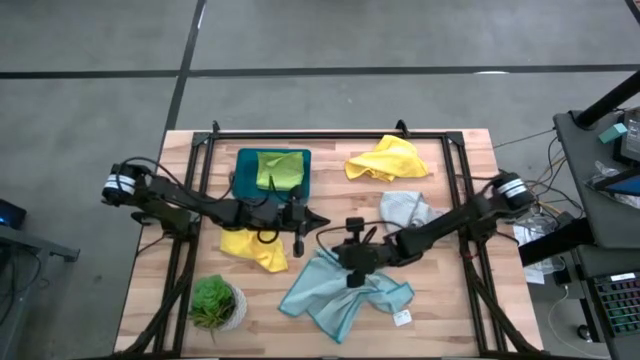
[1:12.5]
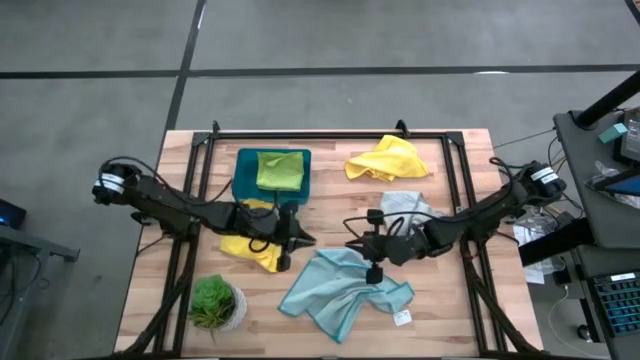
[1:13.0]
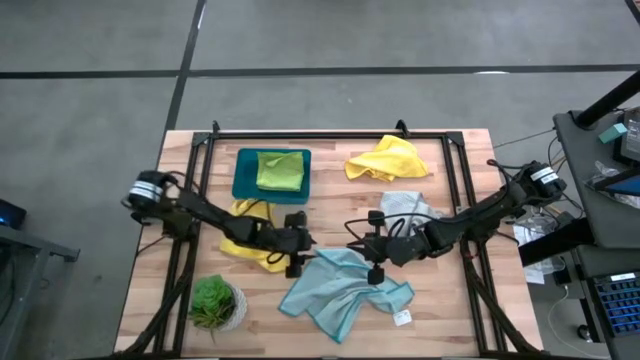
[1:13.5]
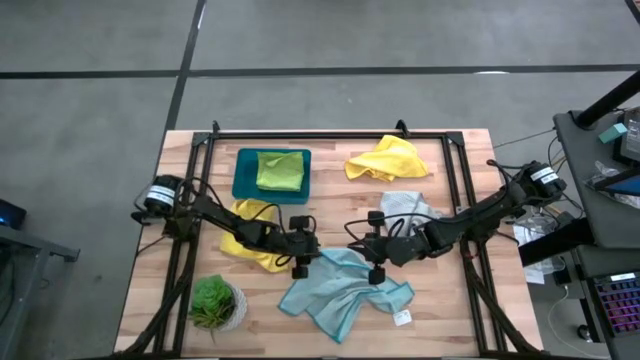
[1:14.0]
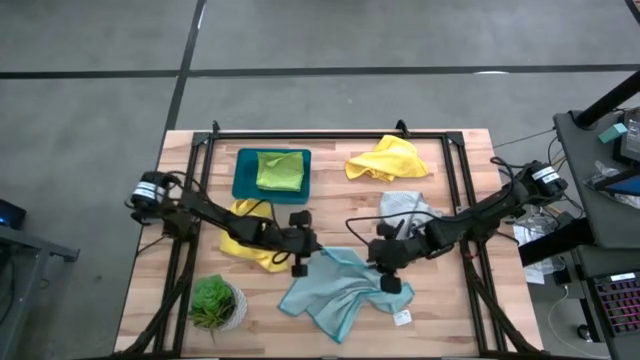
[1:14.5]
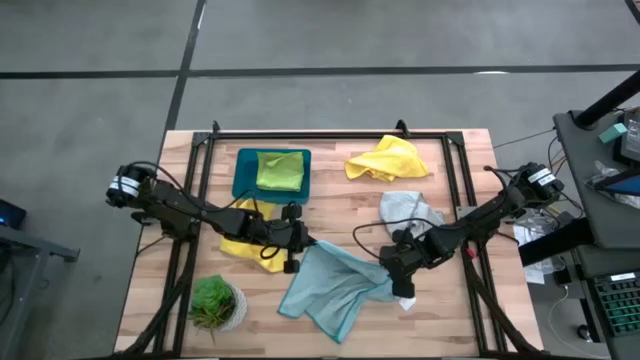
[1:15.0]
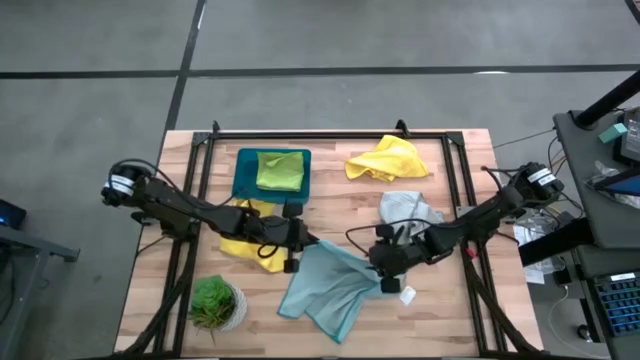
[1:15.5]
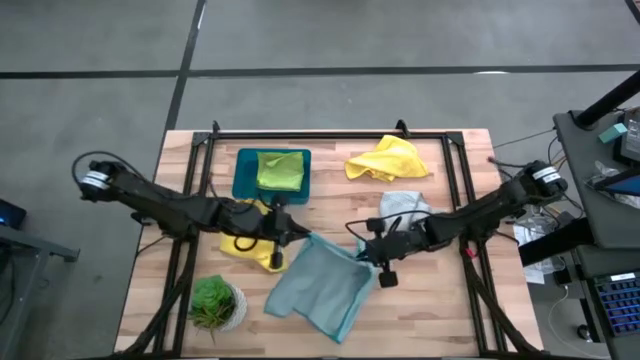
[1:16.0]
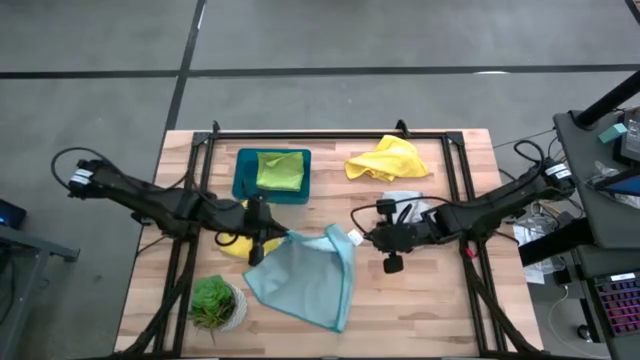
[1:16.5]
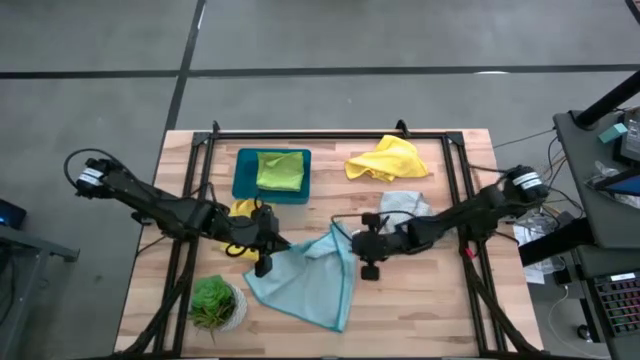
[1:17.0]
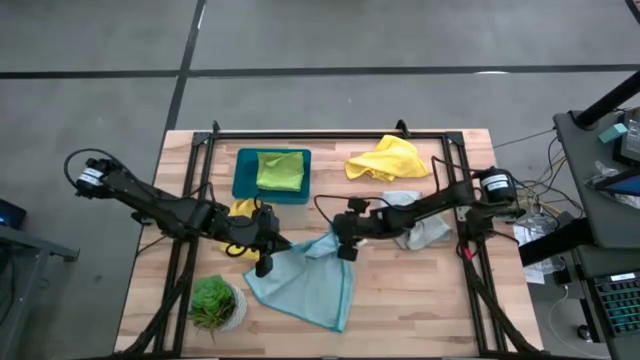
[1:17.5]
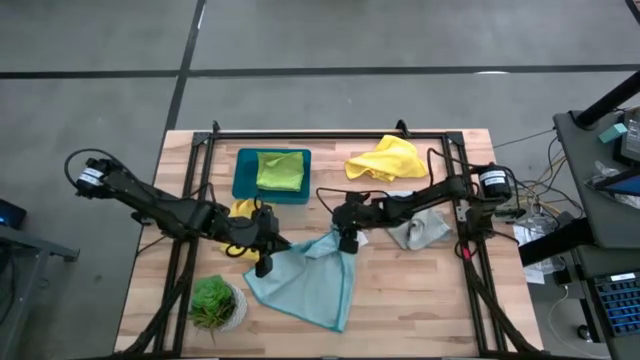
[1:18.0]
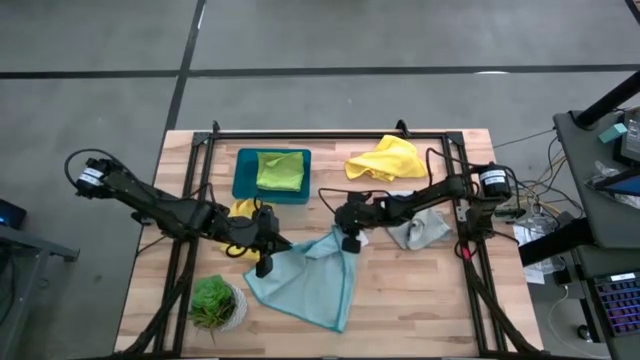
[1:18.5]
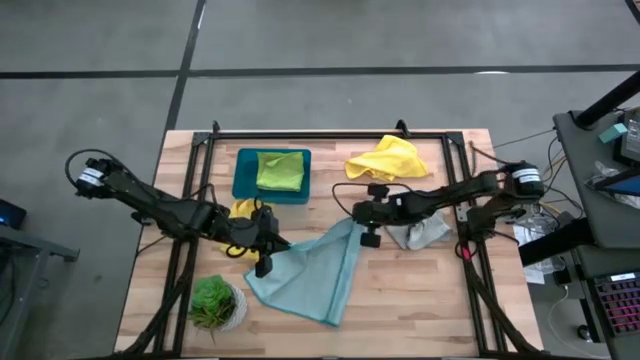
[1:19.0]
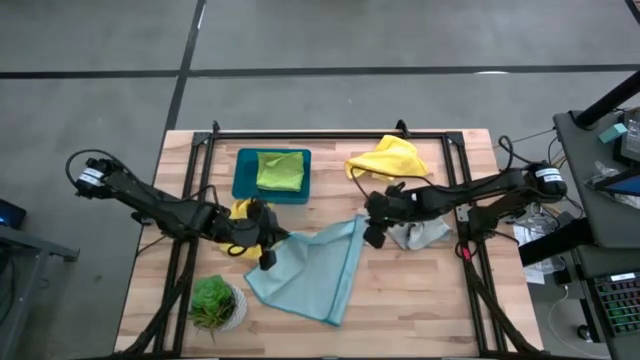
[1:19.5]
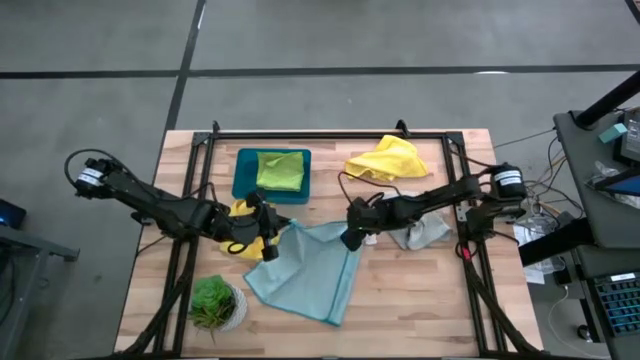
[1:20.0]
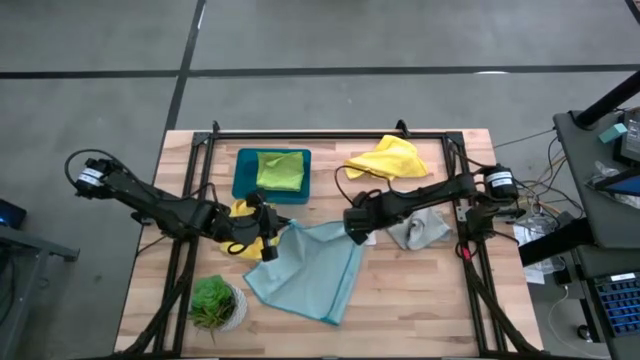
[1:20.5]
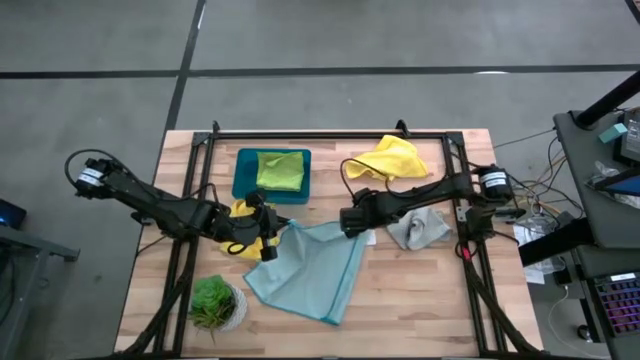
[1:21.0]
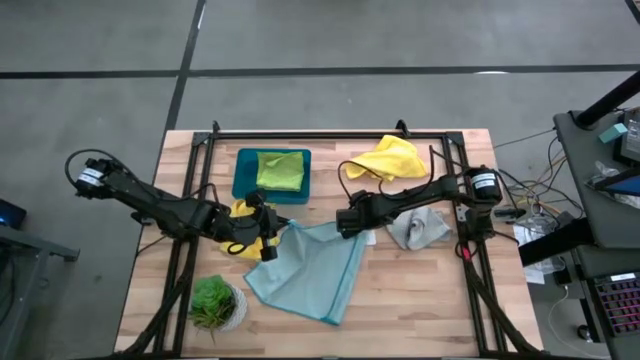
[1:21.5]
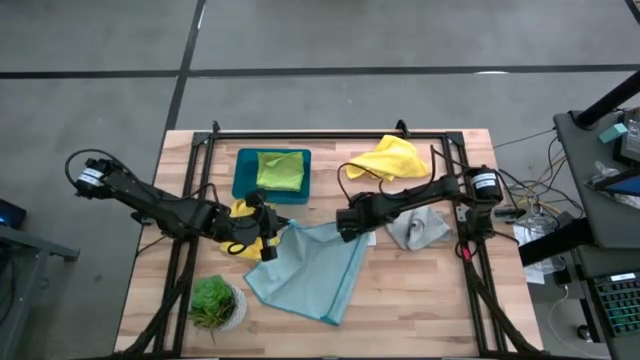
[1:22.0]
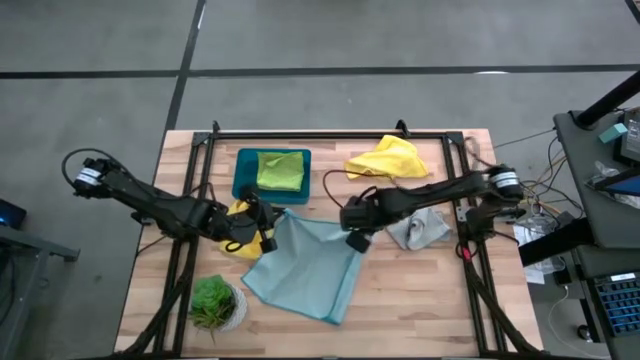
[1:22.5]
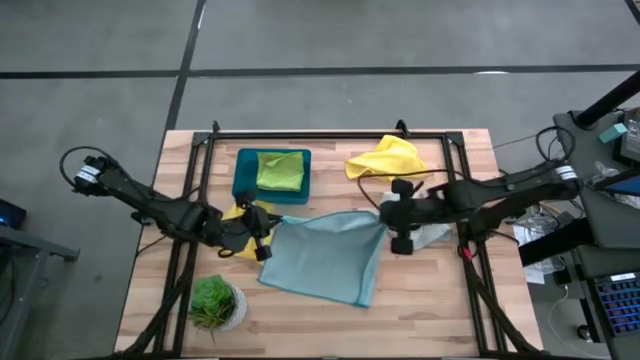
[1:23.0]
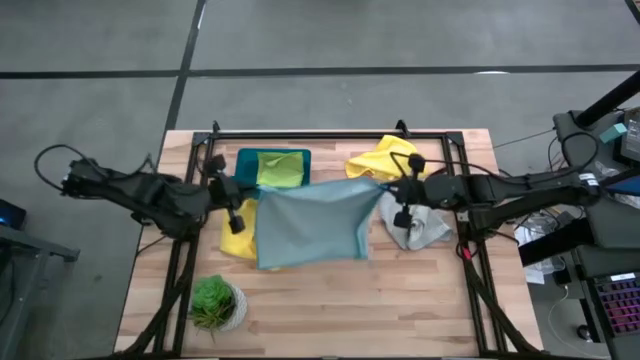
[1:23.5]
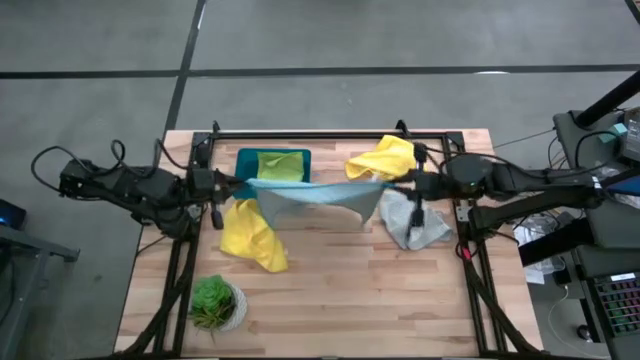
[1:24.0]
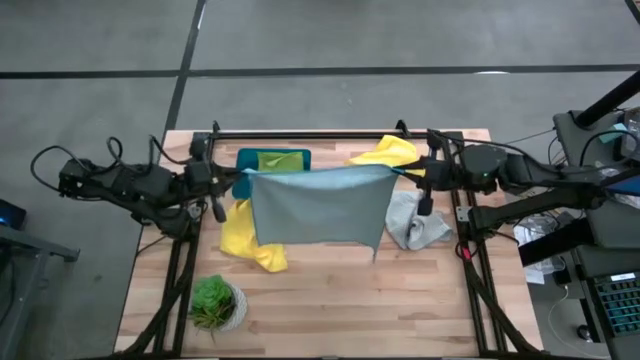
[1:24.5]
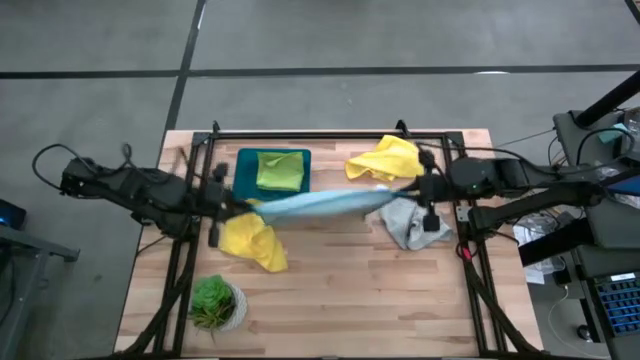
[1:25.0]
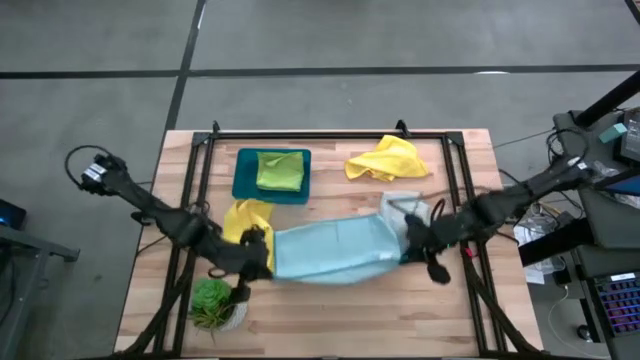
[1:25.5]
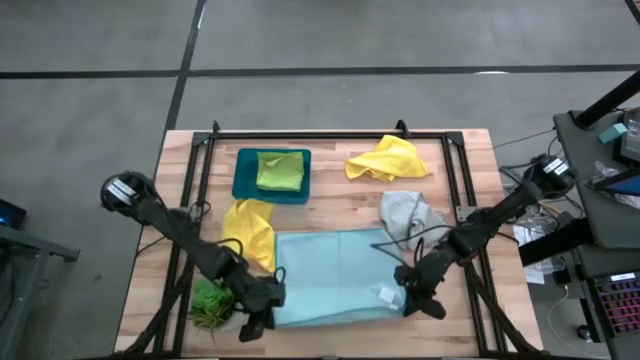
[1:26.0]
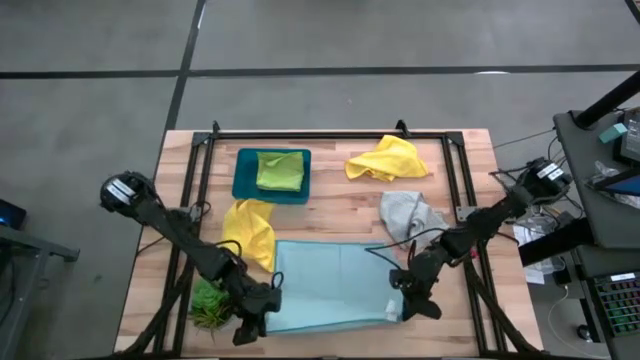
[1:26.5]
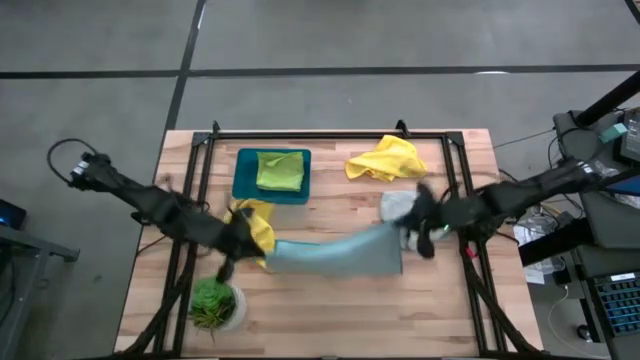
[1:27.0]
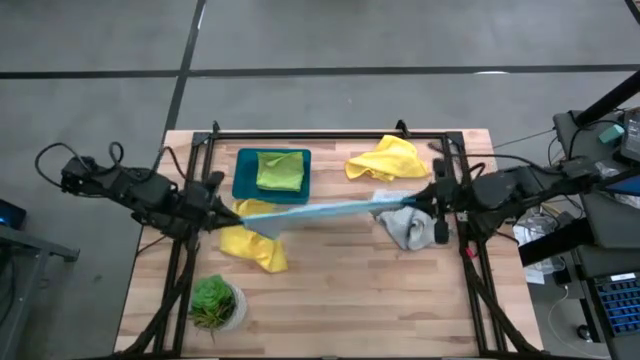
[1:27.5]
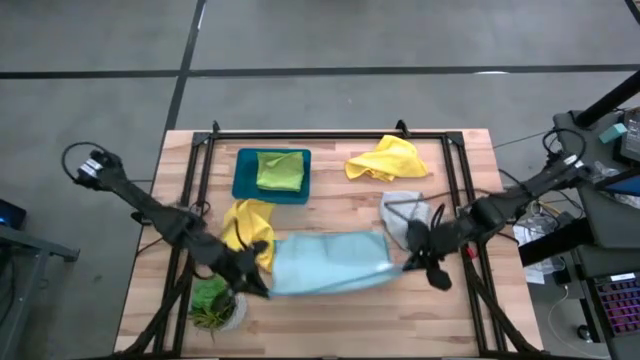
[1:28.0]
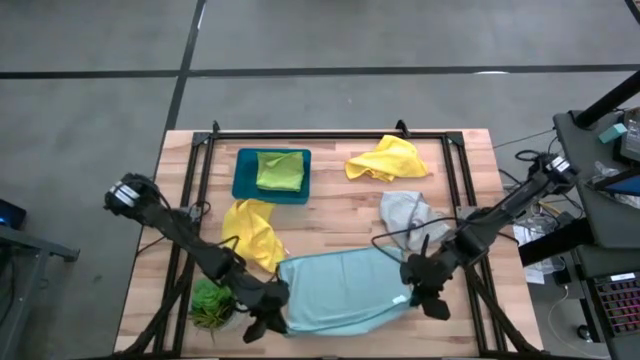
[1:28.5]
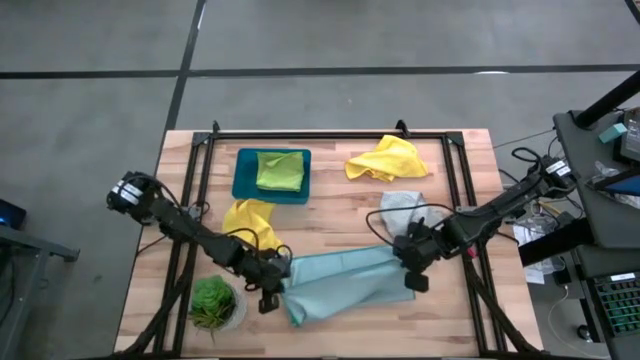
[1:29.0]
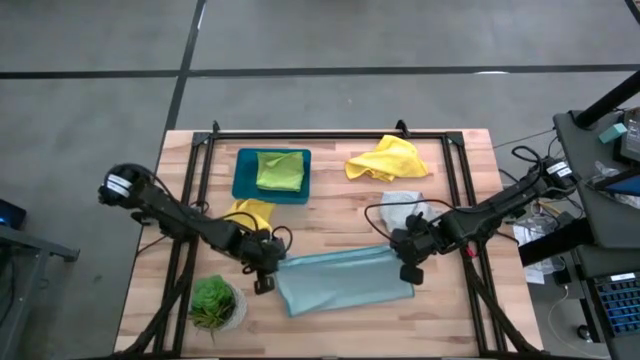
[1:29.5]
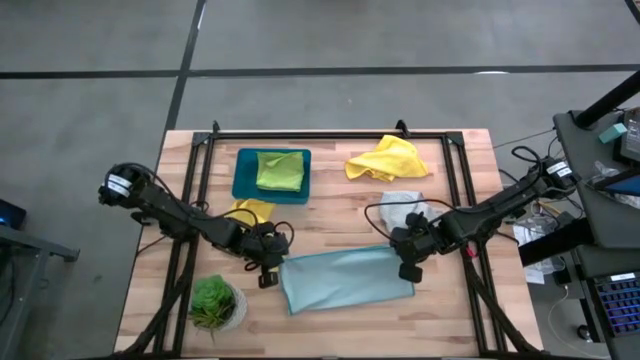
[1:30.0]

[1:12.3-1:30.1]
Task: Fold microfiber towels
Fold the blue microfiber towel

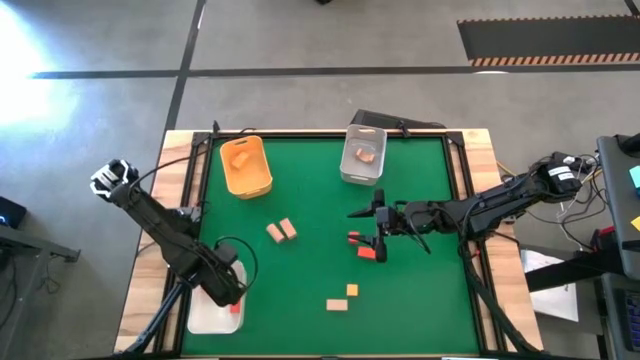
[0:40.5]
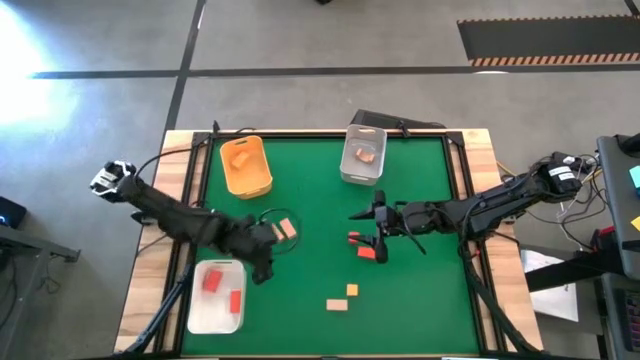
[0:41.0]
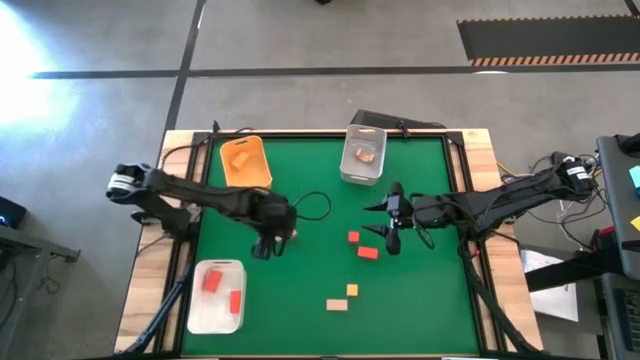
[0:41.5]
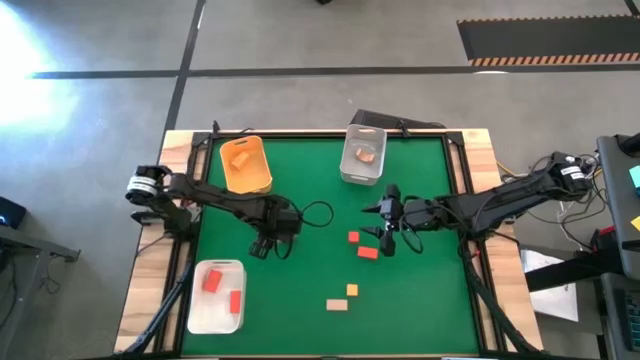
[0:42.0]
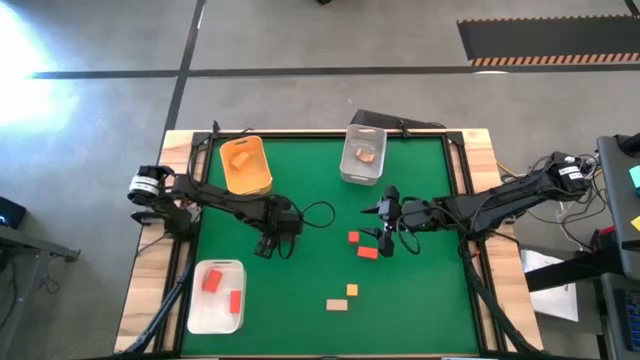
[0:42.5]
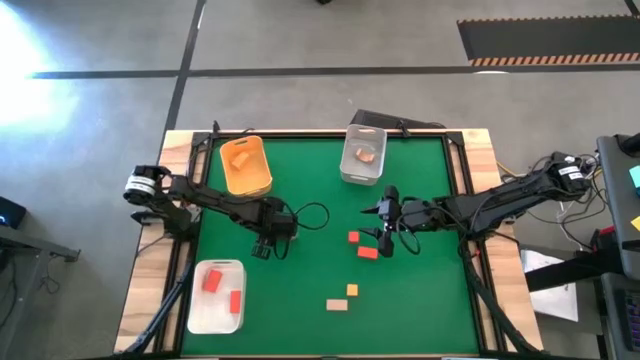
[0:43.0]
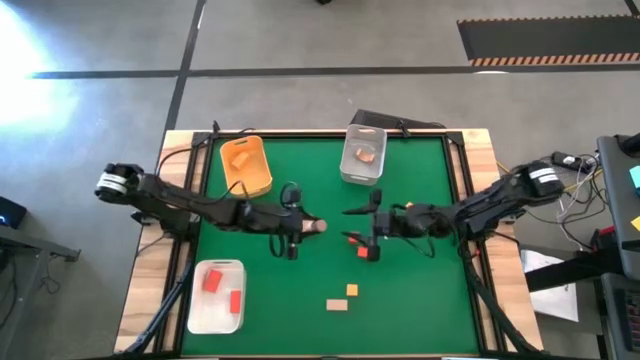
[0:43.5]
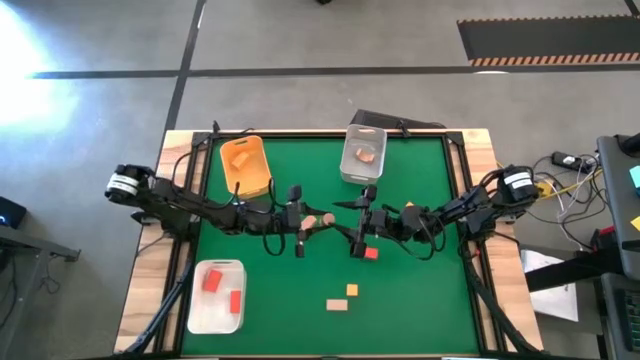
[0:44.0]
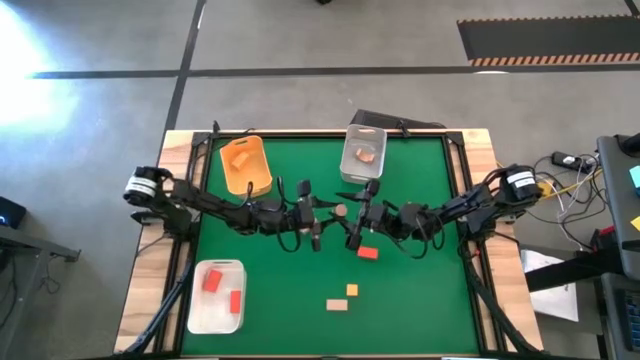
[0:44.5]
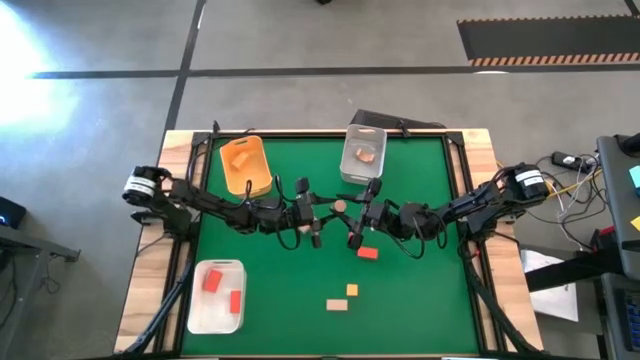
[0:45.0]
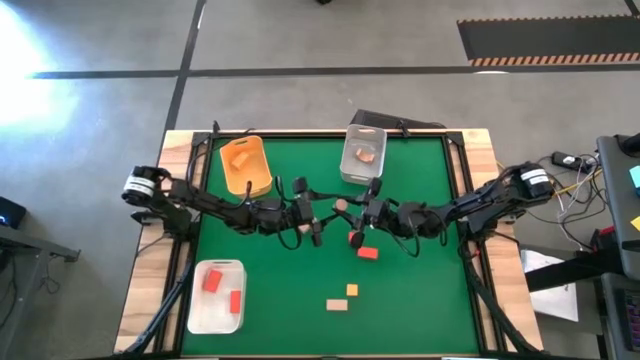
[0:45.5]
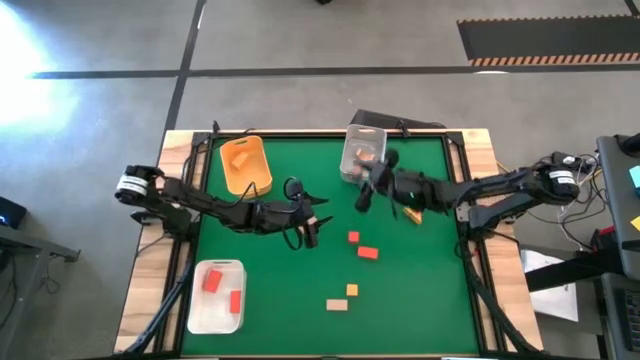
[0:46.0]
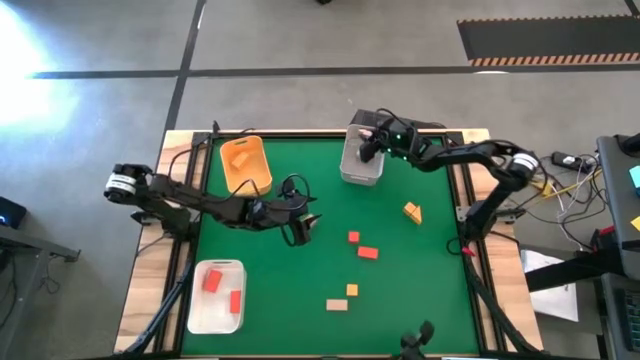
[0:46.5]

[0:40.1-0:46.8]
Task: Sort & place blocks by color
Put the brown block into the gray bin
